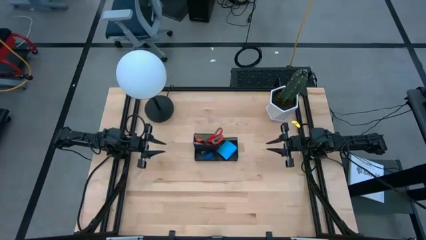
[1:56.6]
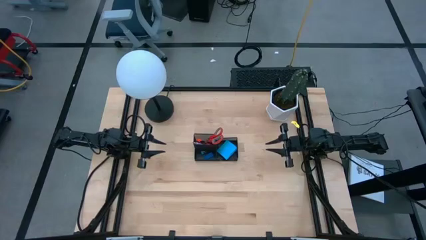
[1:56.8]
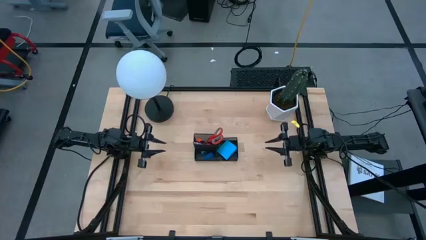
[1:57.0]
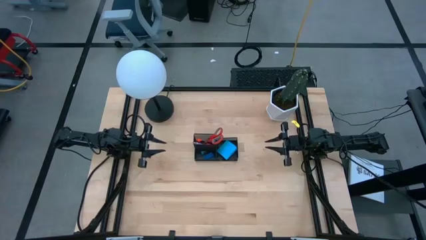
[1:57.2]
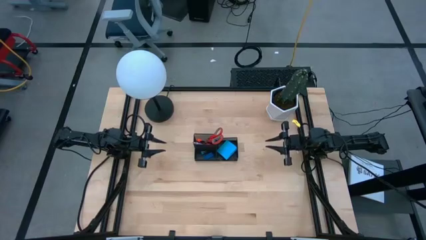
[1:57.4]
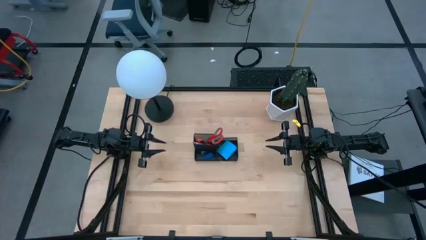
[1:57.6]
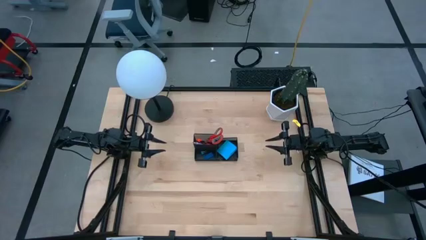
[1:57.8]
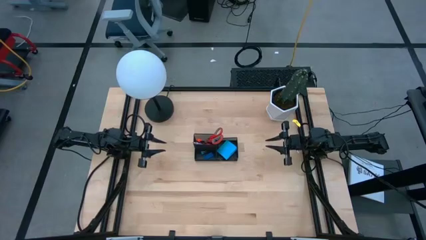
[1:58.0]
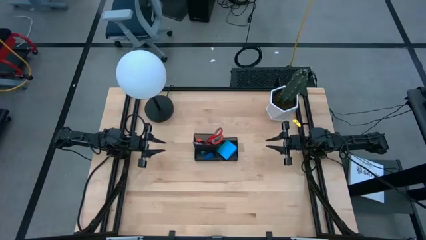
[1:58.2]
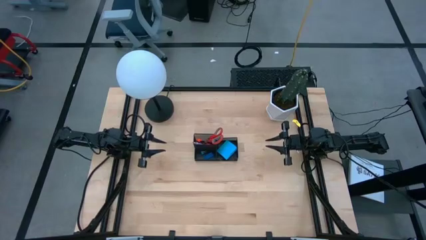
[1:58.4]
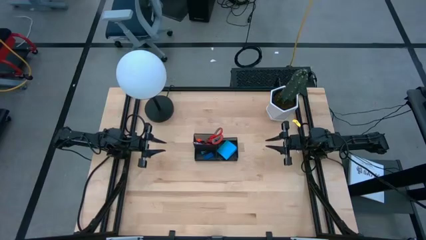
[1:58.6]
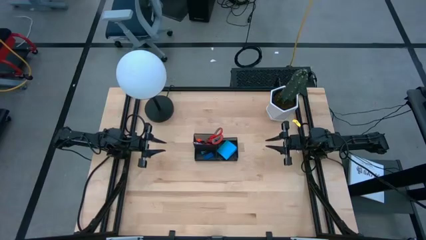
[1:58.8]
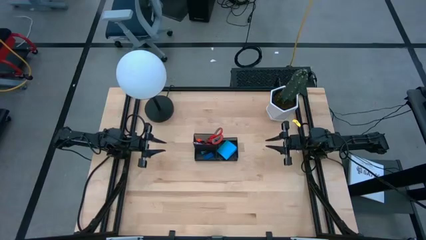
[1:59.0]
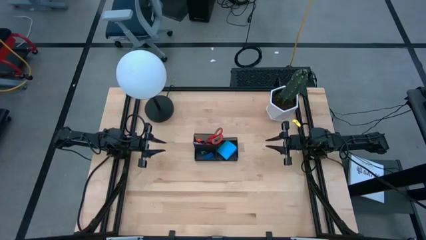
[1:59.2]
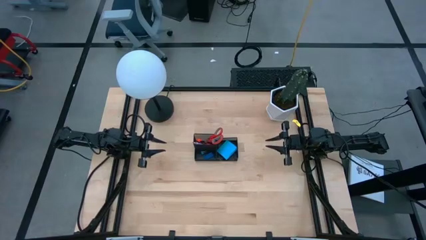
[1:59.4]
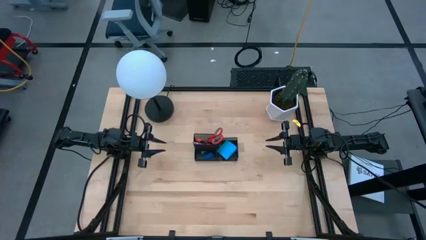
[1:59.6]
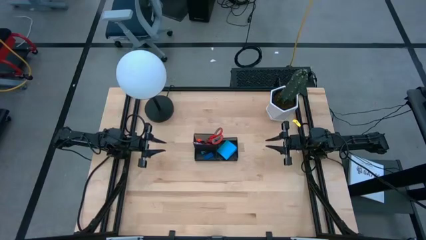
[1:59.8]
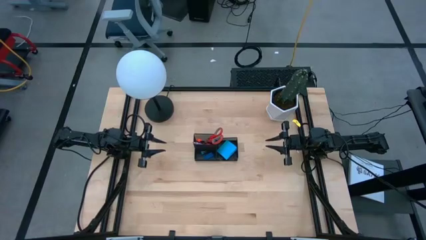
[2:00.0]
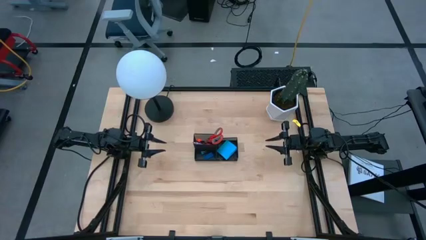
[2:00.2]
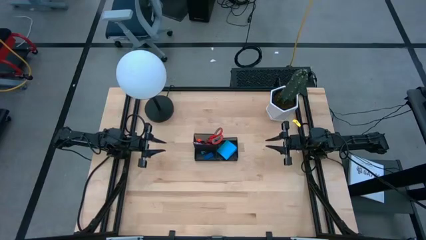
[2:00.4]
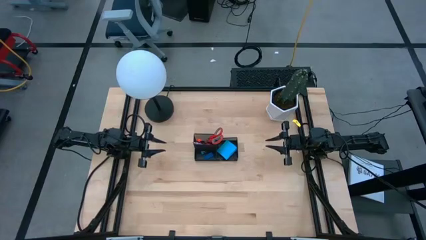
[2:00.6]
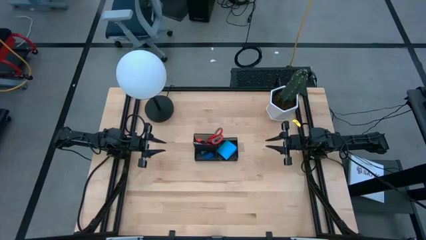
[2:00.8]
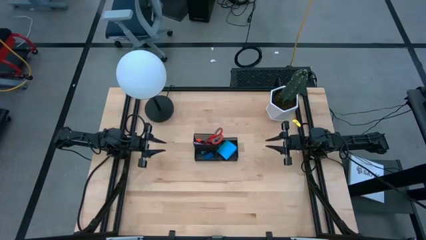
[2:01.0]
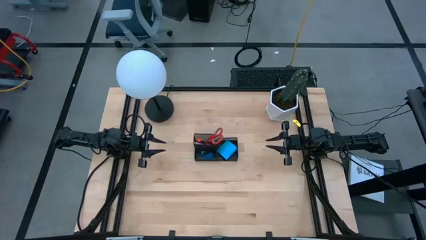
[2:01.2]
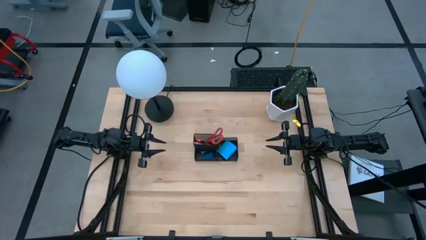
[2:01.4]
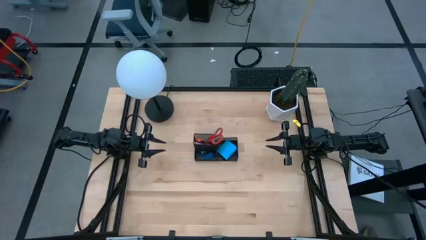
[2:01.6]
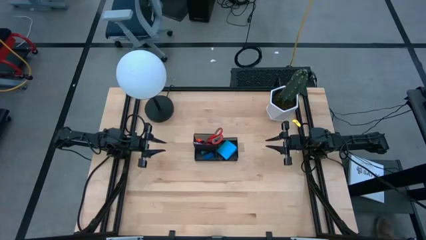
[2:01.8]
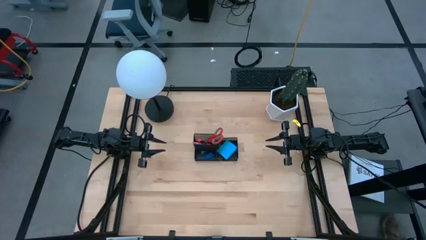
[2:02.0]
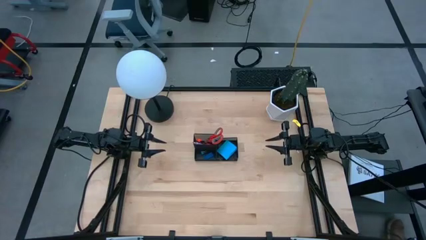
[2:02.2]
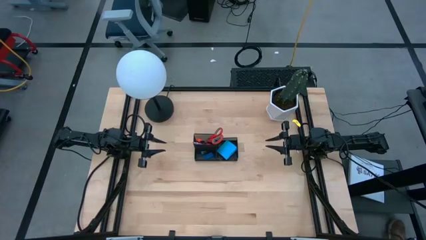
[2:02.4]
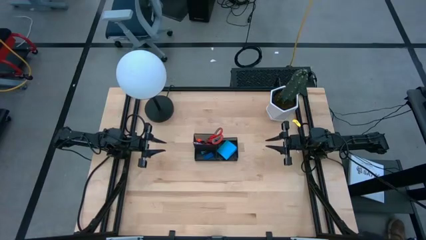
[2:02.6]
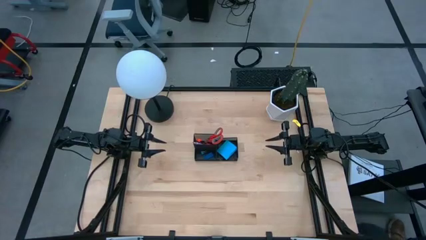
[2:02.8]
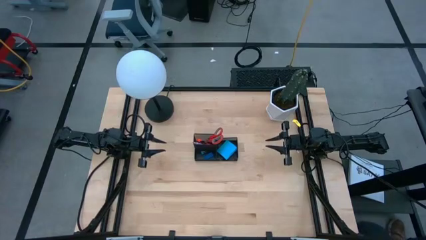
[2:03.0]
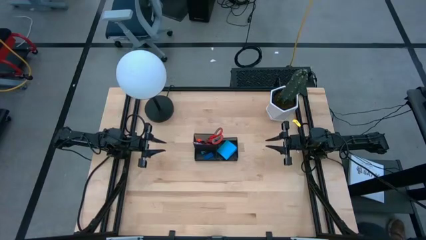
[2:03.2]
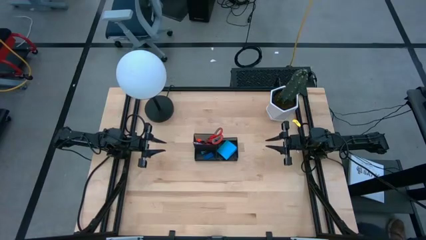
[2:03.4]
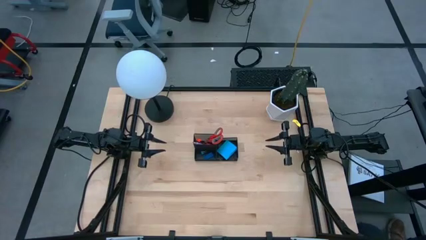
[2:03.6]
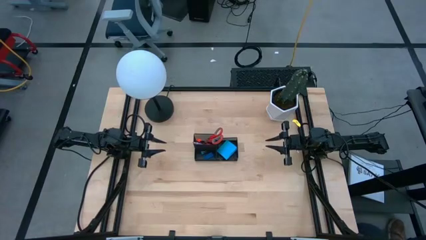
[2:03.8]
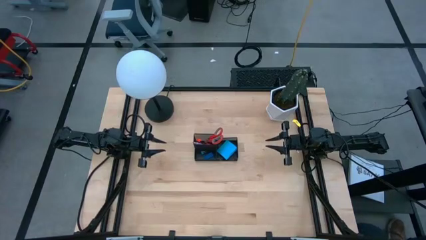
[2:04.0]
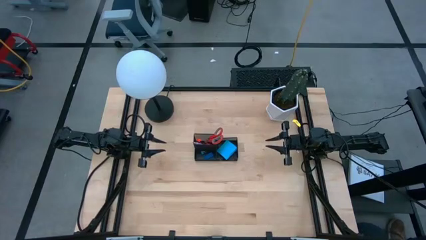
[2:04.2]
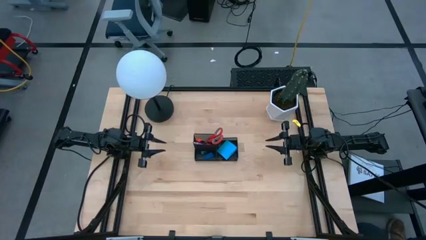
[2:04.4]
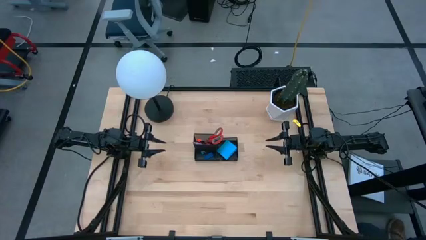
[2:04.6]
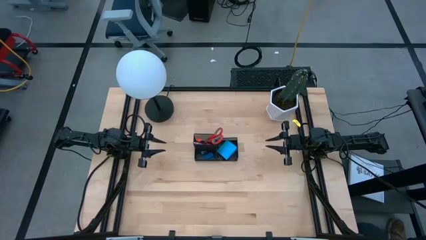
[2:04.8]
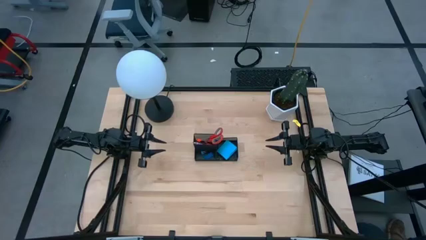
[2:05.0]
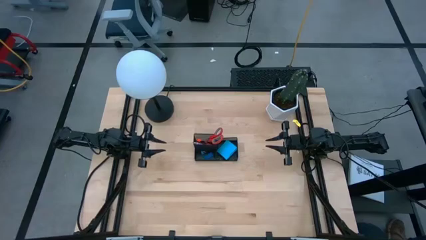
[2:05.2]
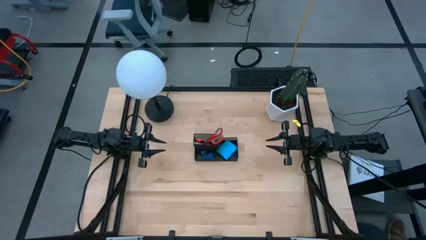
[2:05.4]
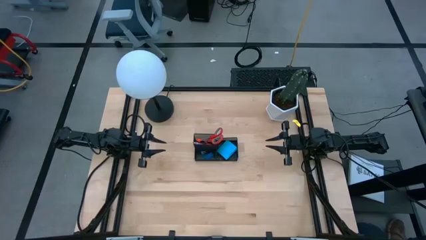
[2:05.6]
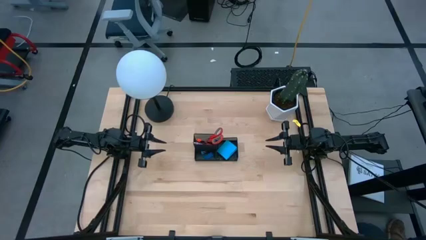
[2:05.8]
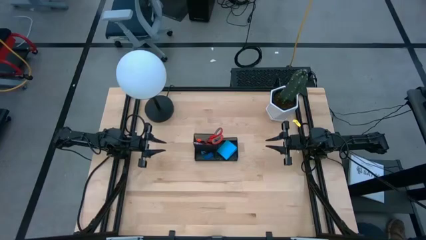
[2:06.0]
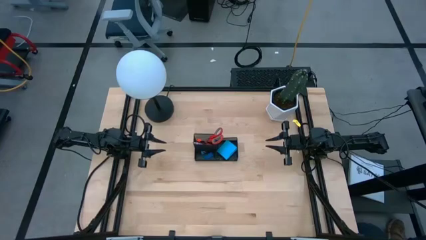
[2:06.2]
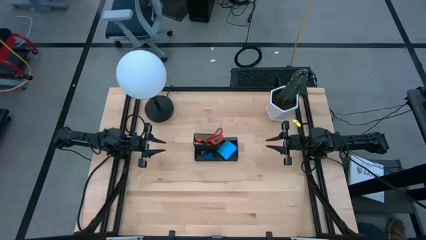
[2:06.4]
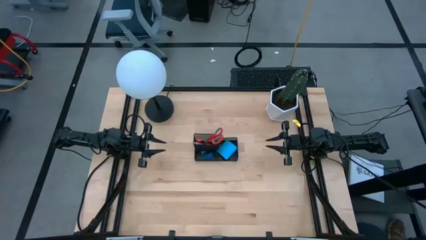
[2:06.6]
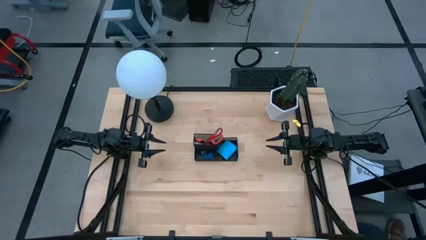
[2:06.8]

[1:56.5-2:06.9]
Task: Pick and place office supplies into organizer
Return to Home Position
